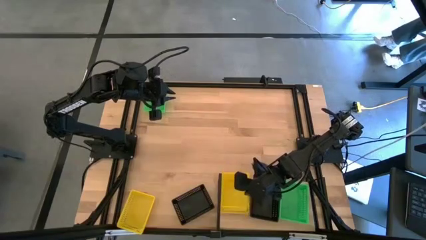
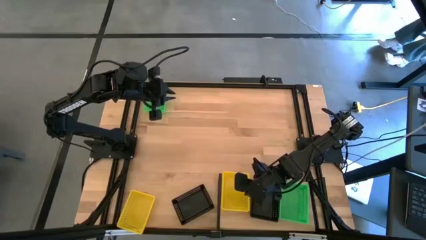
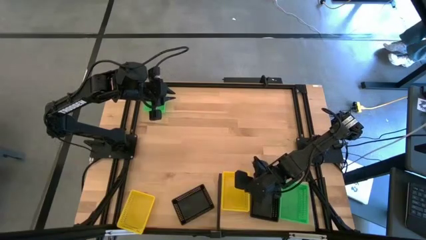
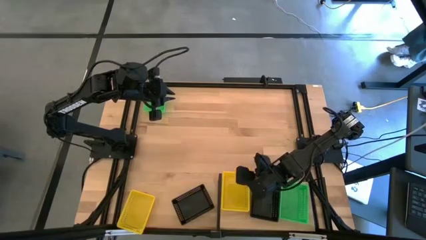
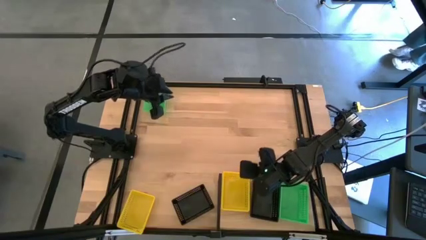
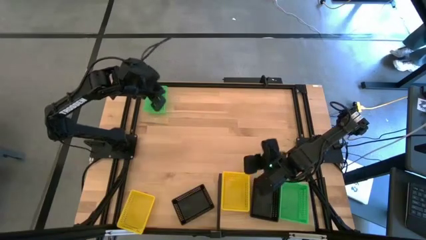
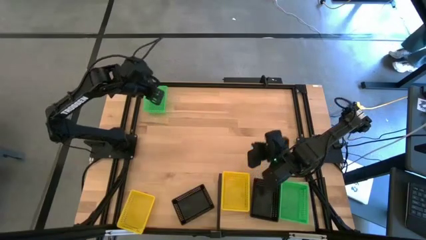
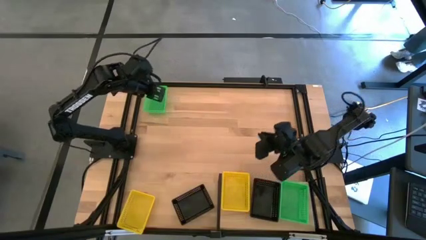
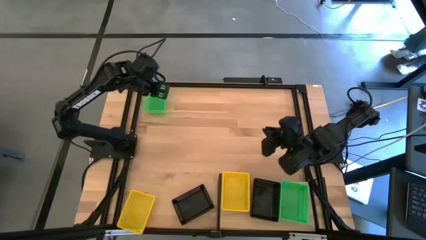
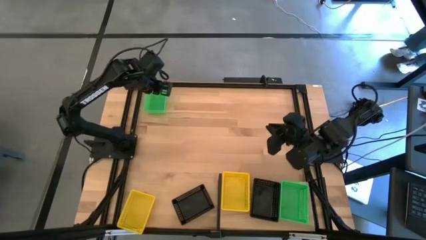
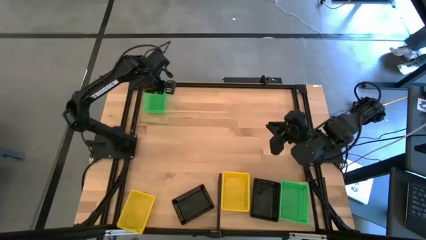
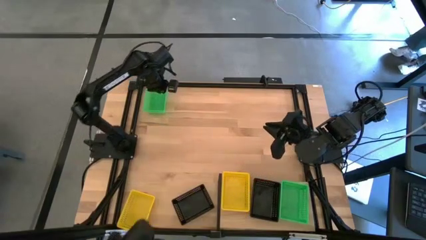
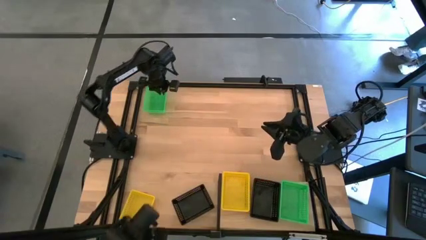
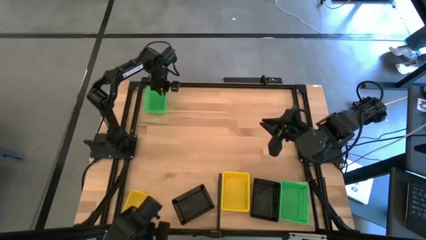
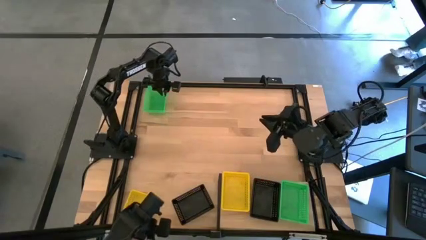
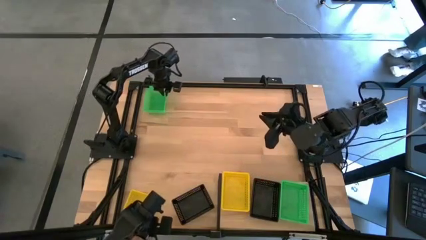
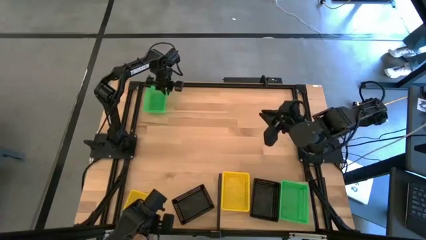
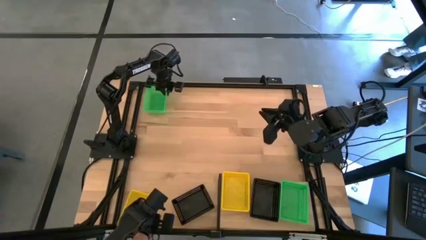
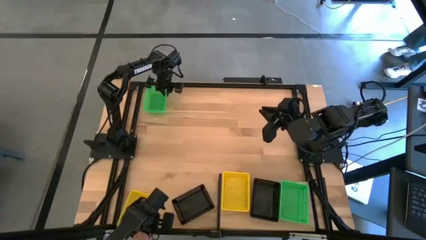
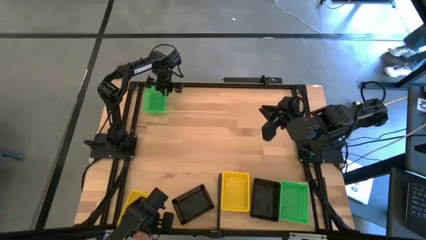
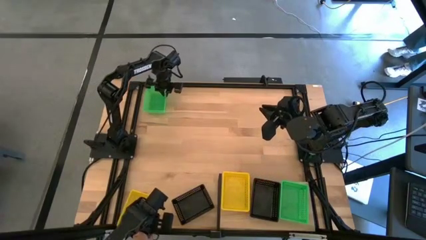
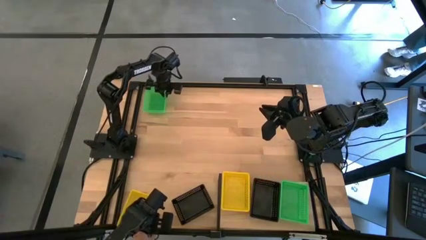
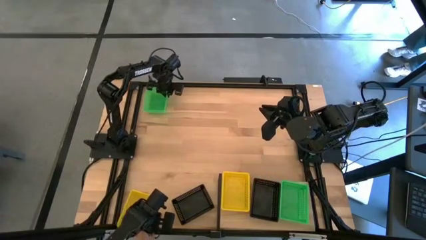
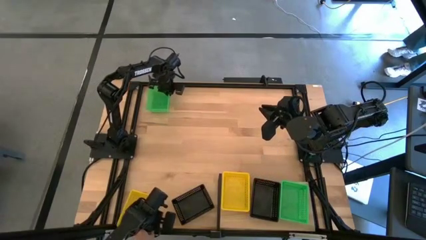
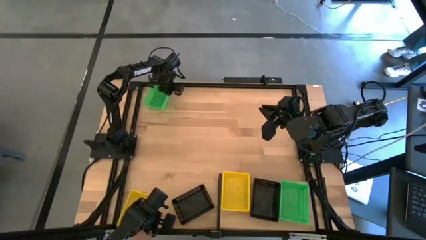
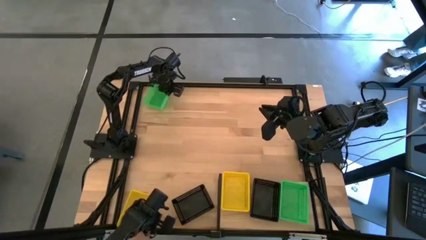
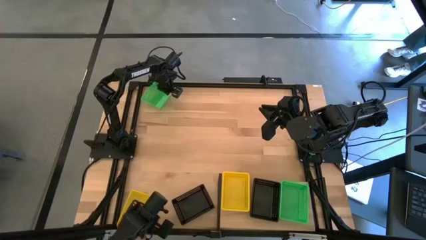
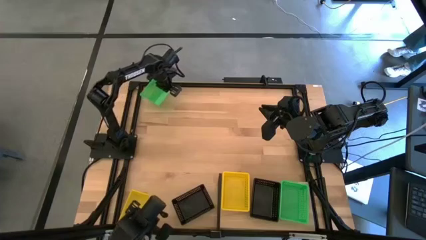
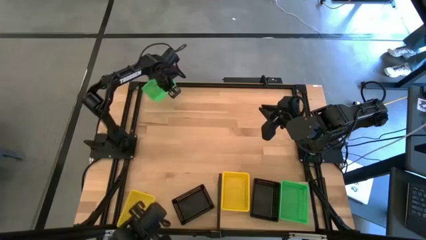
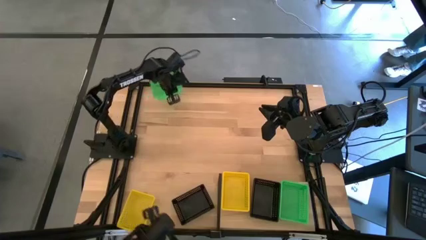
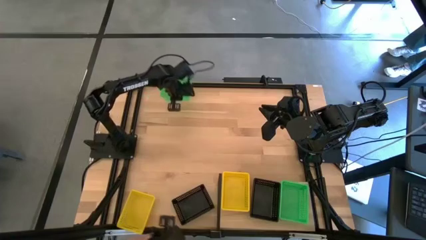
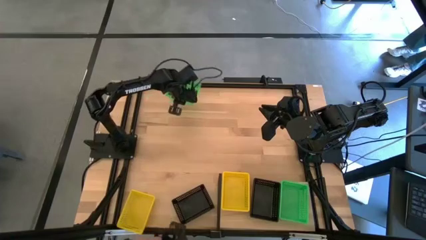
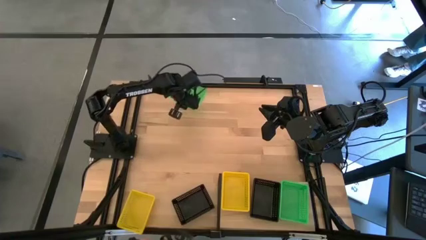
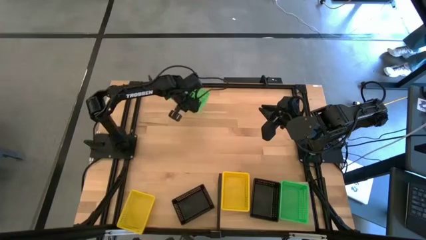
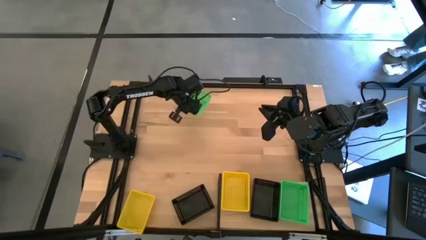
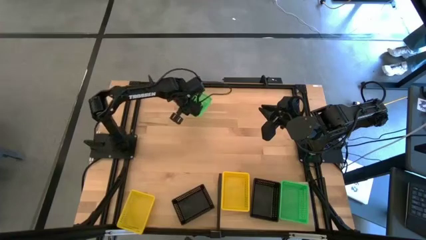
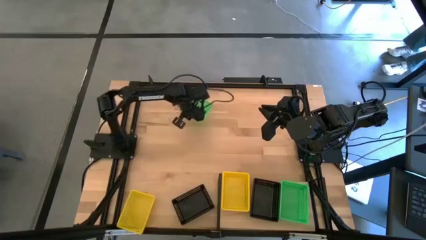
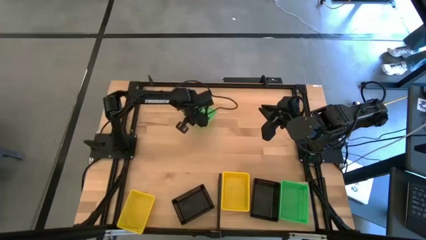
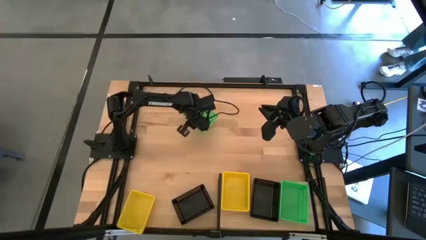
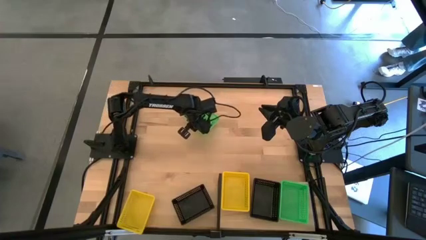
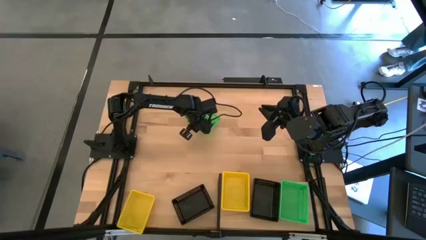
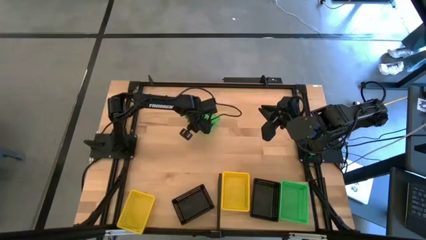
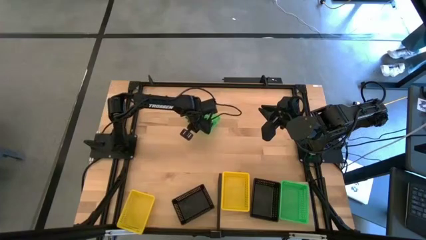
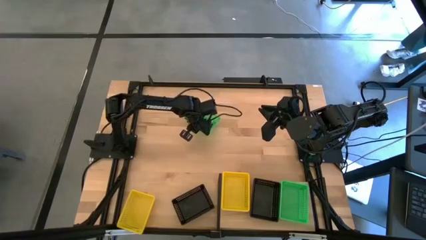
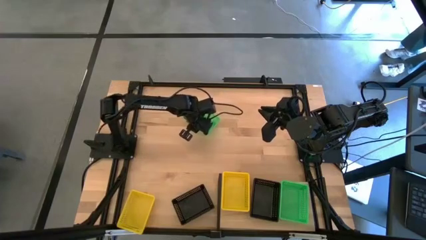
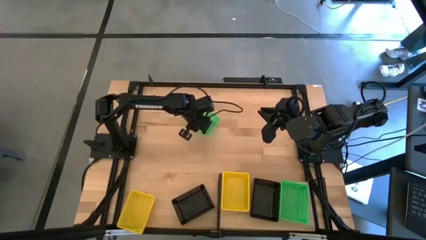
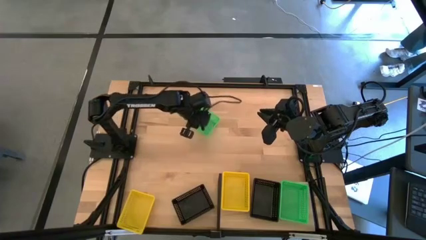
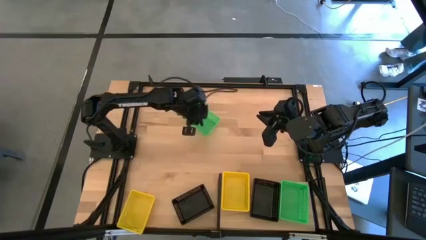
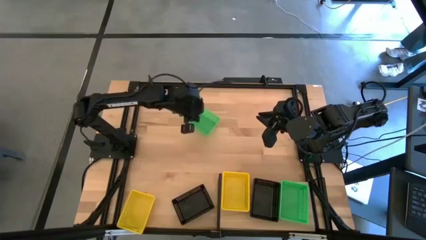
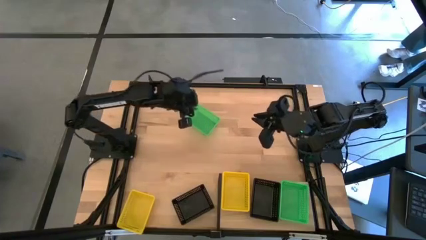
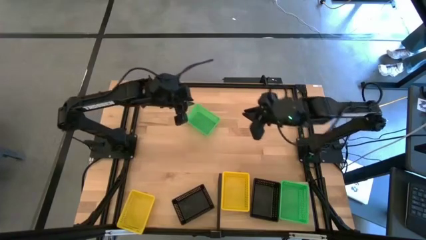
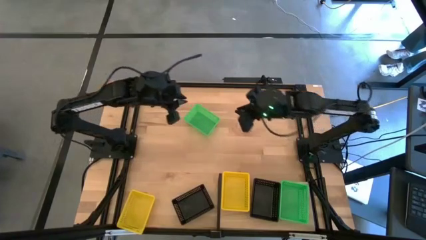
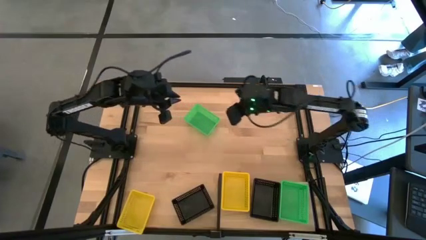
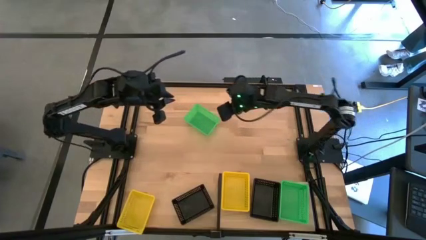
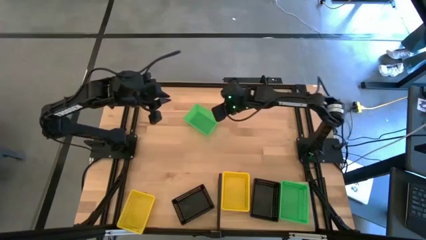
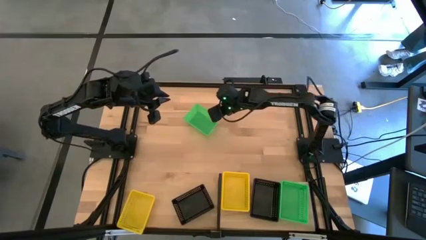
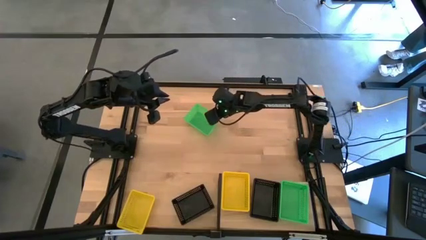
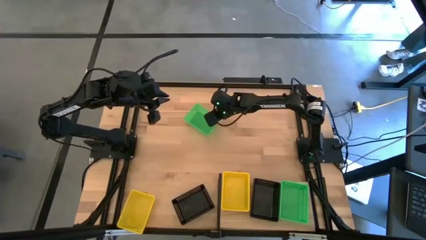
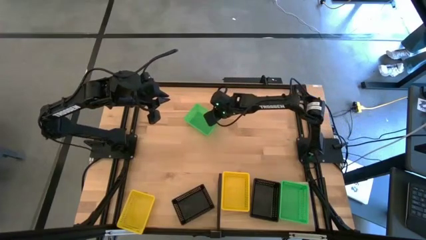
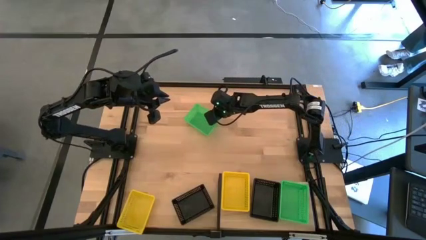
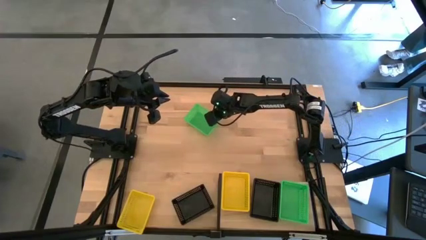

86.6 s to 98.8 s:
Task: Stack baskets on shelf by color
Stack the green bin on top of the green bins on the shelf

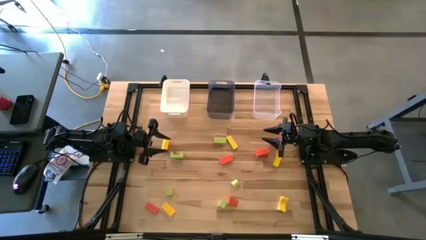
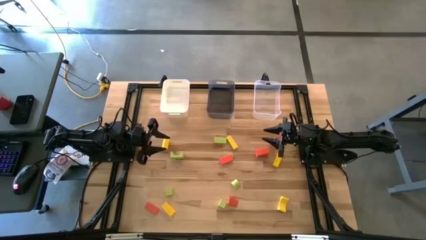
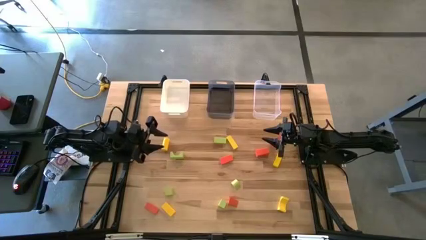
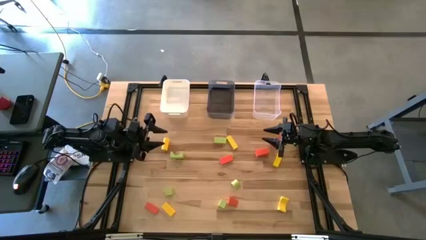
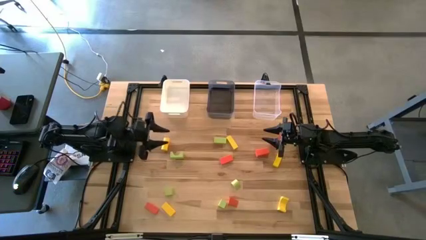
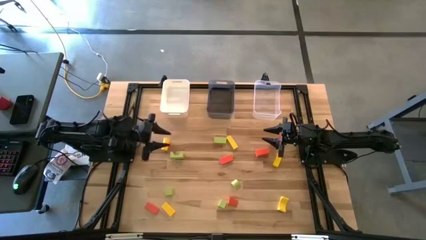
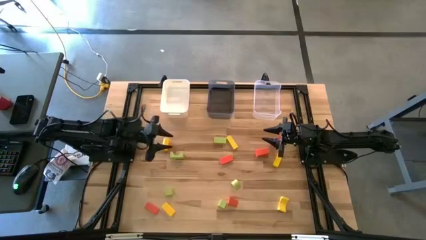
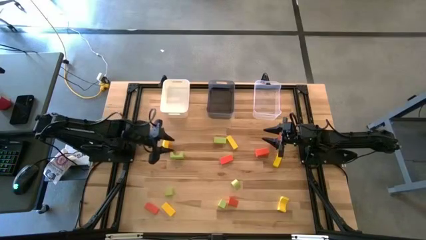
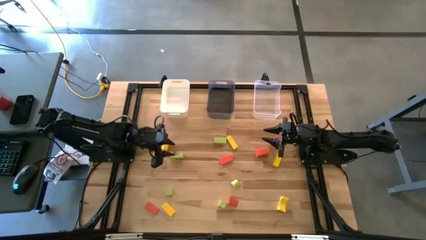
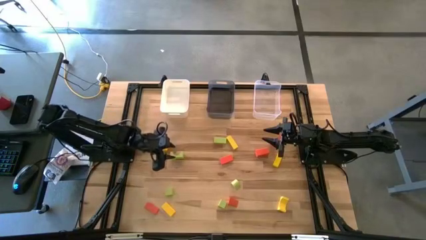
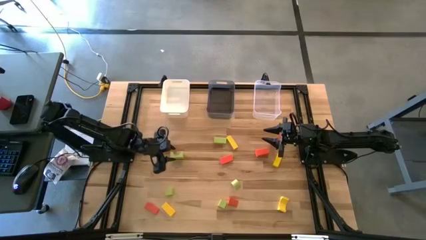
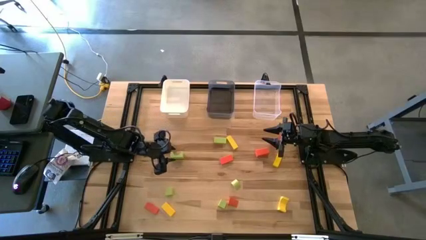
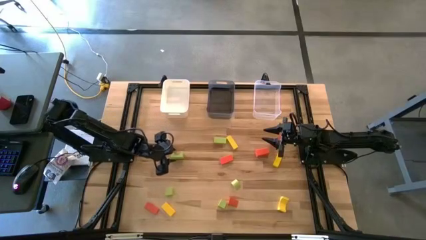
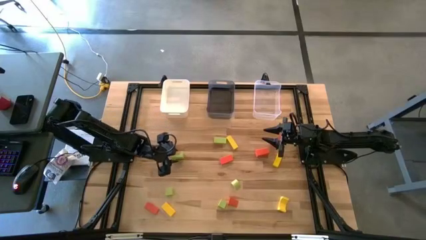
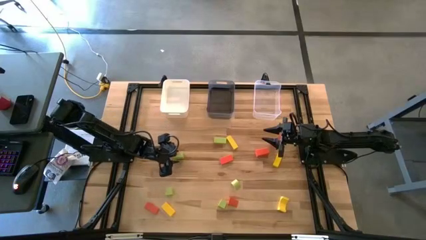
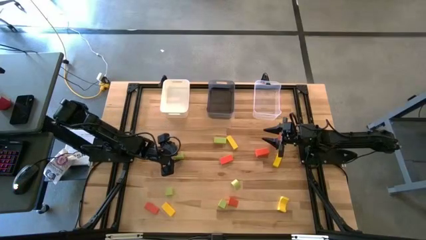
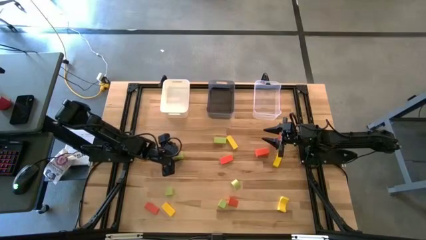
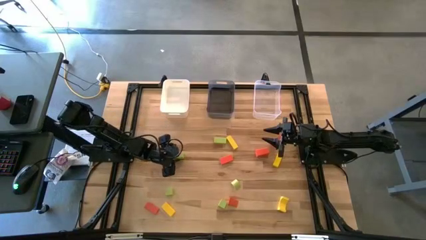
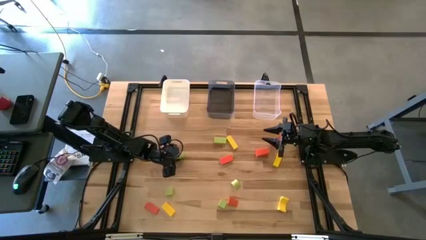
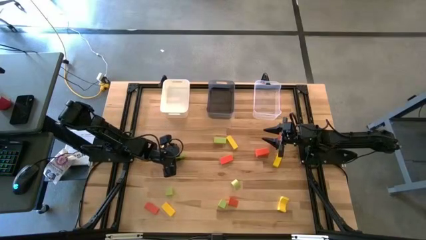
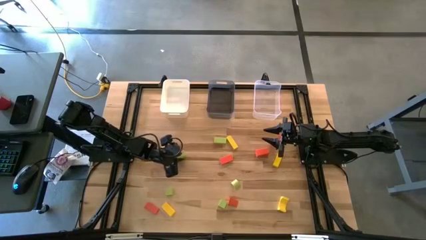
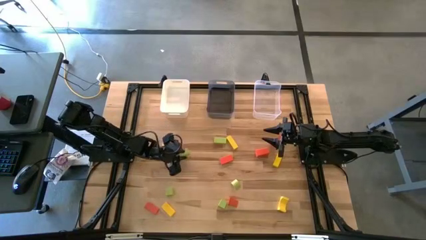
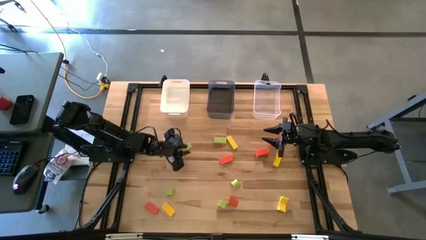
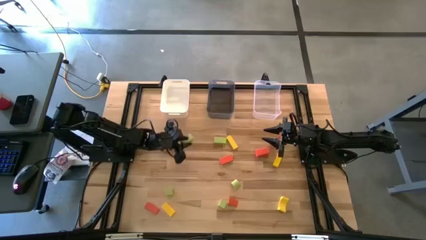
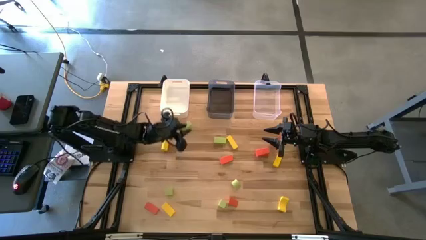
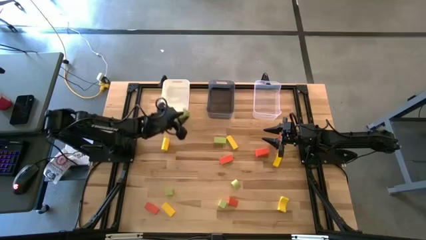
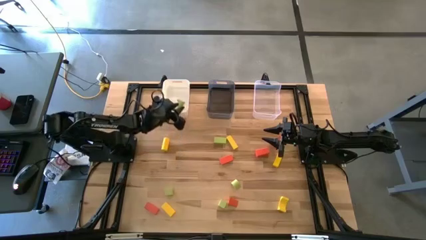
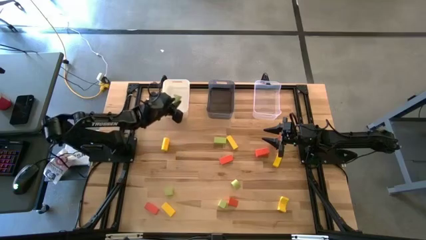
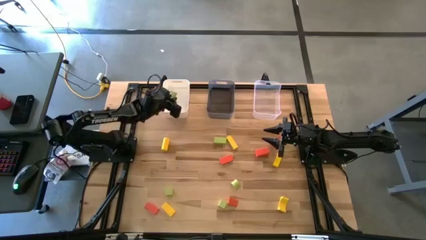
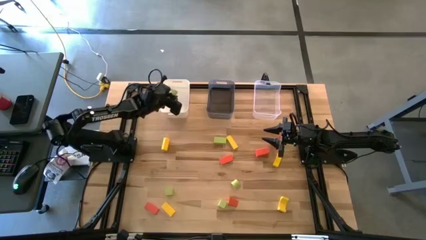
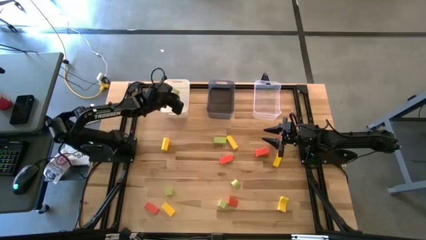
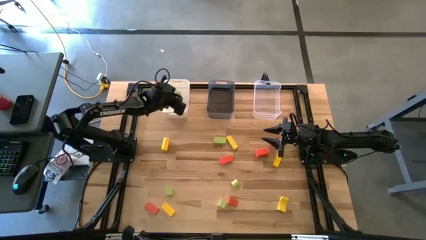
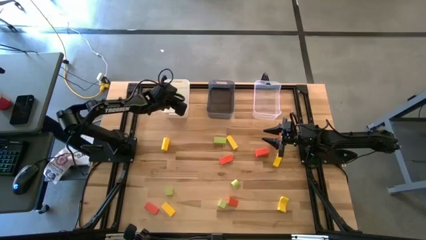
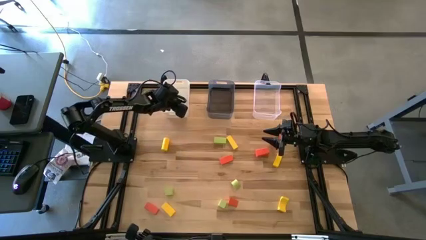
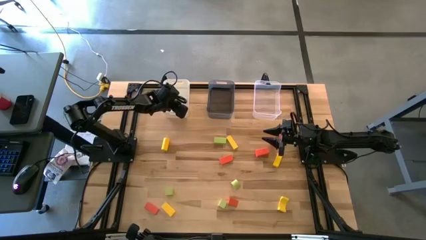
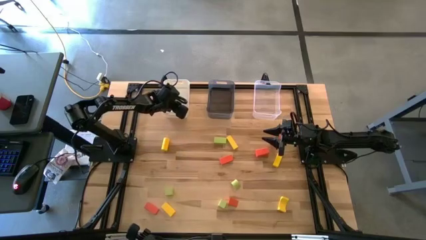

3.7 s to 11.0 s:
Task: Sort & place blocks by color
Put the green block into the white bin
